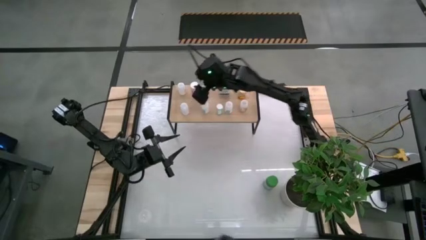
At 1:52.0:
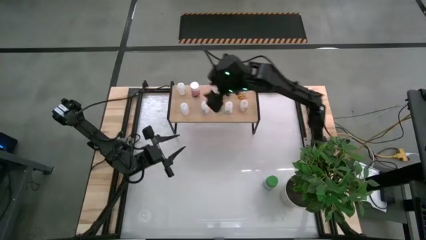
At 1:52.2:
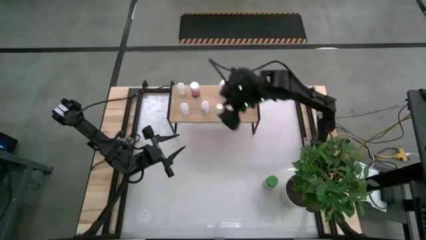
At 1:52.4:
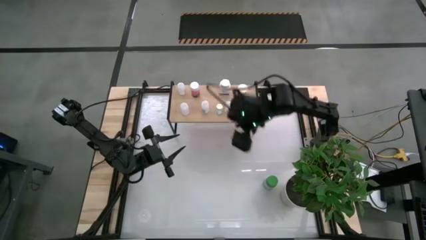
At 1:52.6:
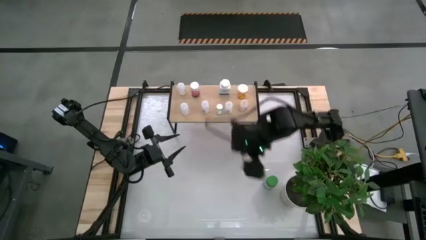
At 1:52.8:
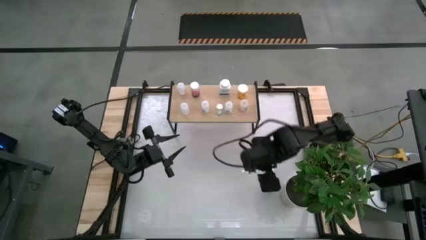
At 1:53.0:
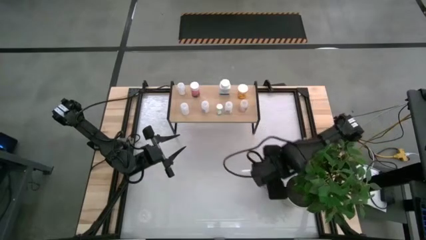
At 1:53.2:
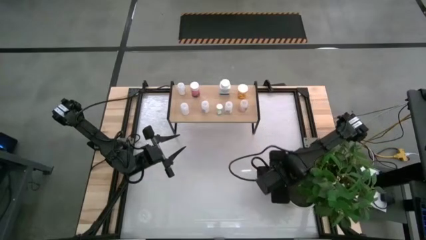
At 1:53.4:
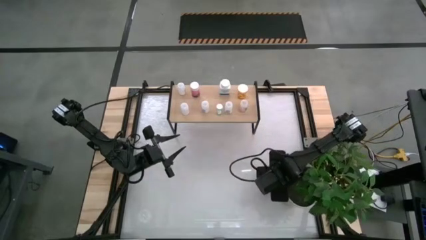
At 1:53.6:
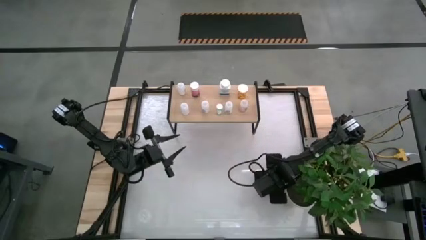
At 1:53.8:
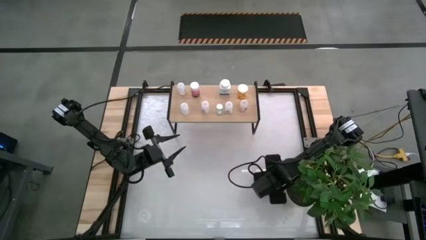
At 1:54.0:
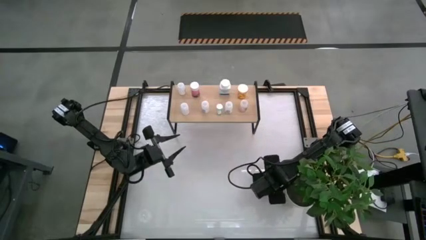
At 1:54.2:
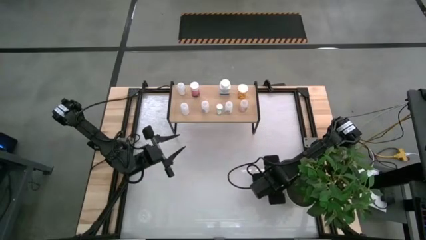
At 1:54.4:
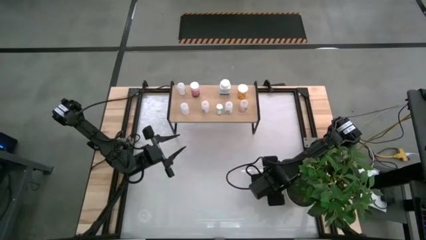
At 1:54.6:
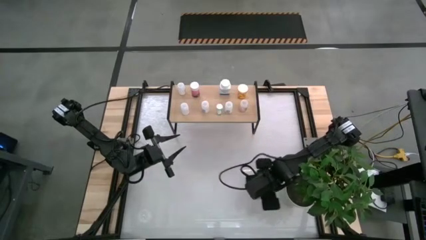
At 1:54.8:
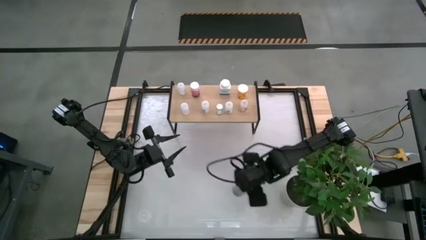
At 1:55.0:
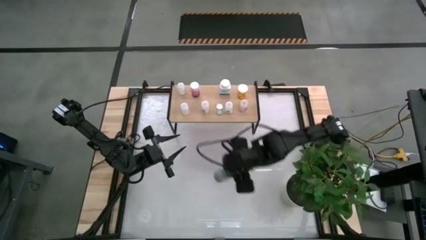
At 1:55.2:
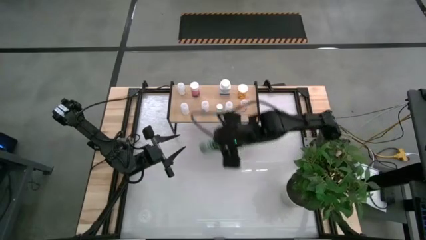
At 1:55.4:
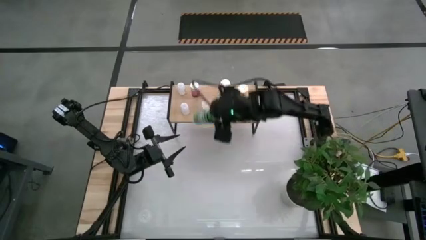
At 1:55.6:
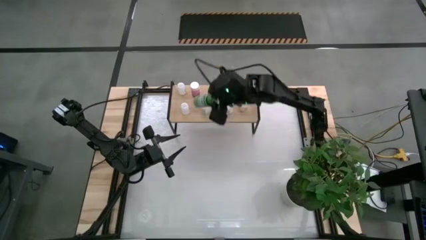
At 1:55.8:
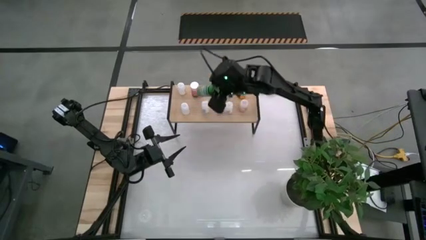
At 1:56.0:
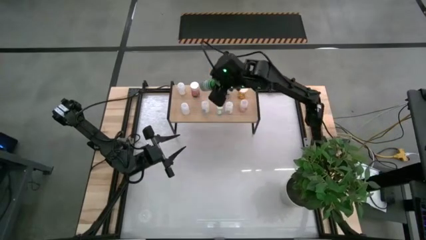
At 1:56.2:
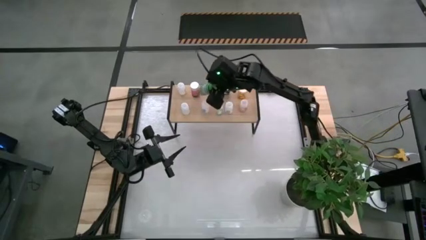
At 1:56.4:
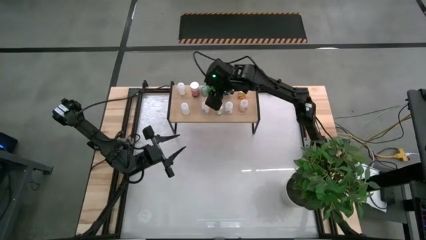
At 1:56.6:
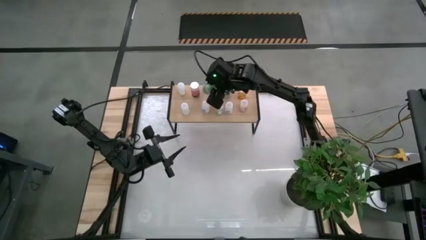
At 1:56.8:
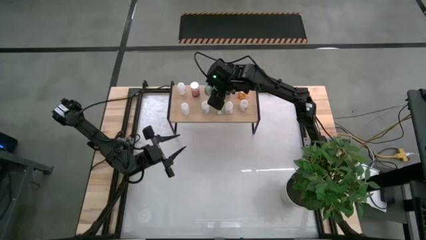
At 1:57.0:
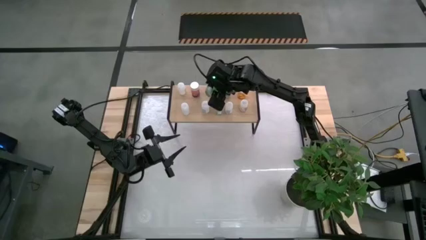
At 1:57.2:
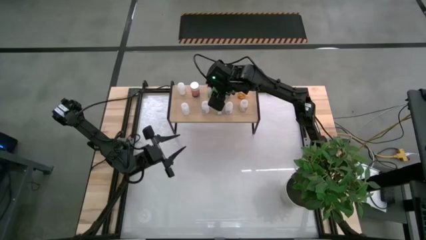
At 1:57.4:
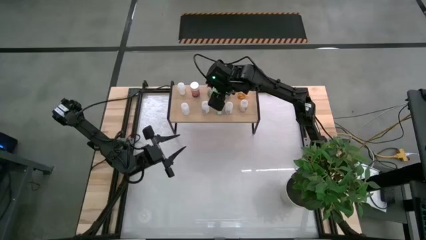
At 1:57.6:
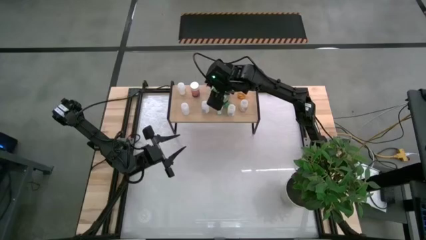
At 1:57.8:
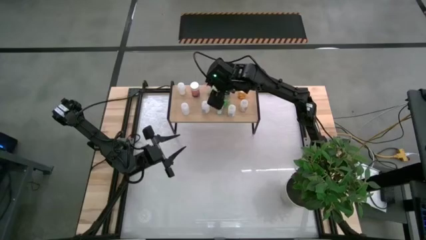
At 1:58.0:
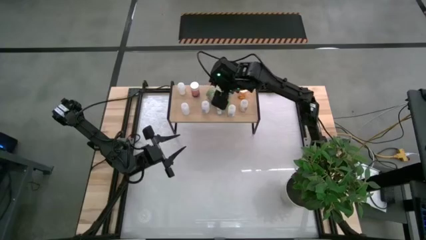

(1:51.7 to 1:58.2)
Task: Pick and place medicine bottles onto shelf by color
Put the green pill bottle on the shelf

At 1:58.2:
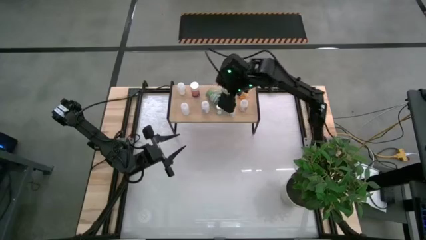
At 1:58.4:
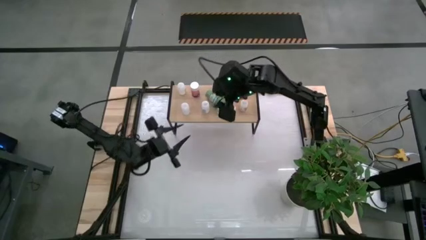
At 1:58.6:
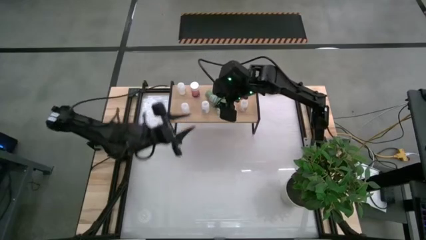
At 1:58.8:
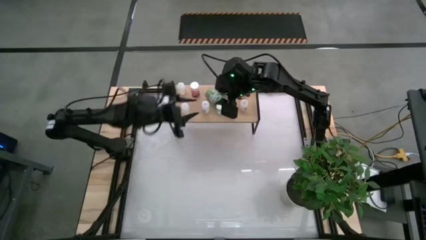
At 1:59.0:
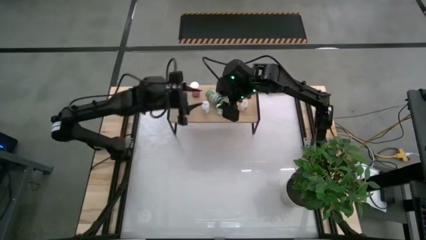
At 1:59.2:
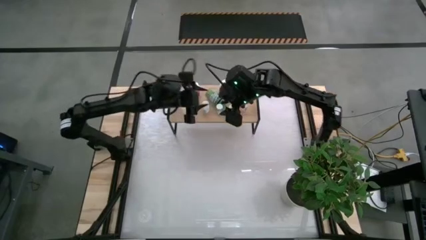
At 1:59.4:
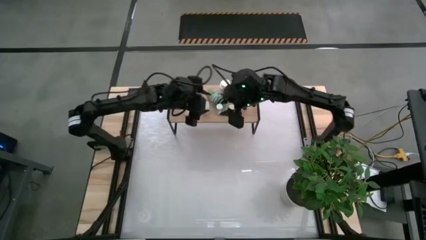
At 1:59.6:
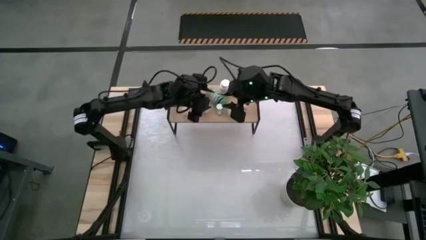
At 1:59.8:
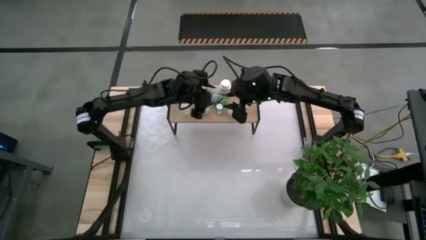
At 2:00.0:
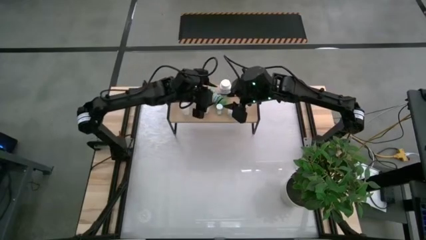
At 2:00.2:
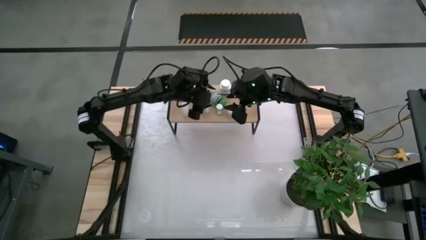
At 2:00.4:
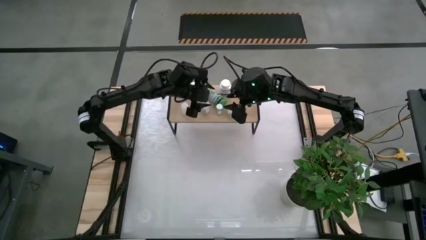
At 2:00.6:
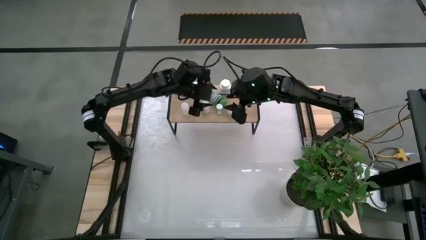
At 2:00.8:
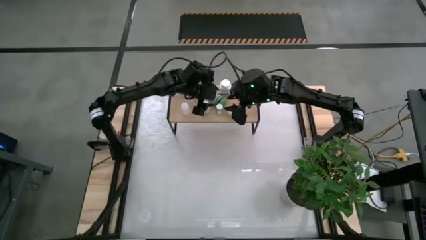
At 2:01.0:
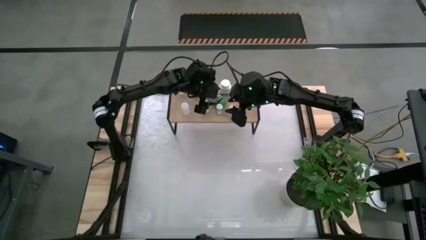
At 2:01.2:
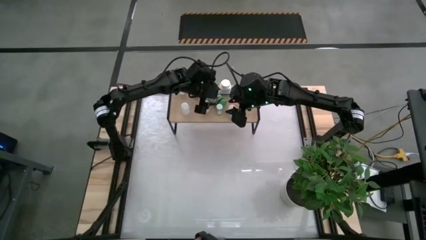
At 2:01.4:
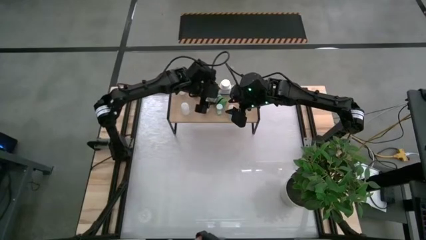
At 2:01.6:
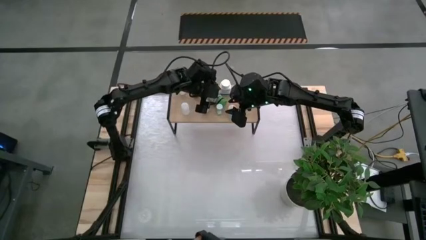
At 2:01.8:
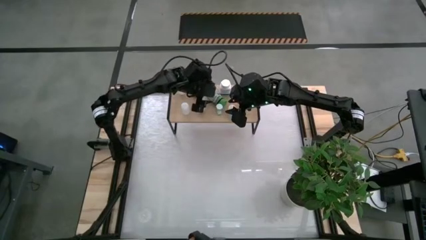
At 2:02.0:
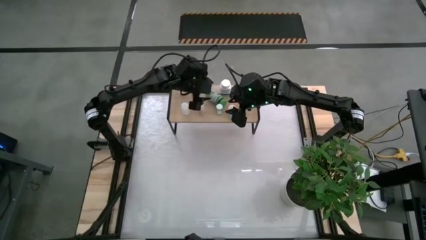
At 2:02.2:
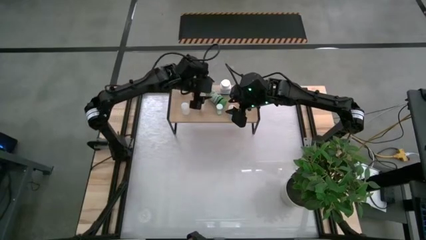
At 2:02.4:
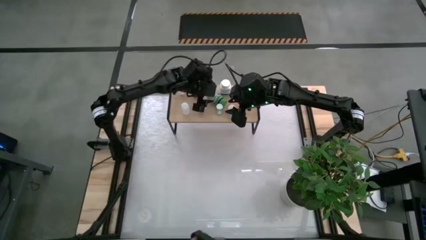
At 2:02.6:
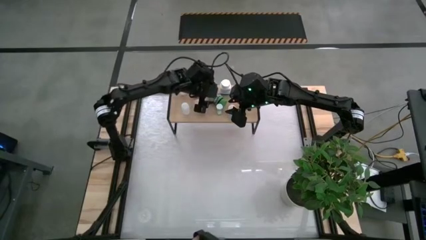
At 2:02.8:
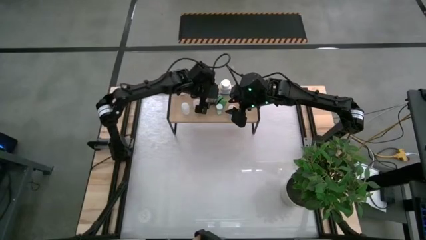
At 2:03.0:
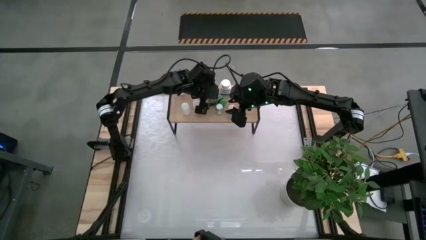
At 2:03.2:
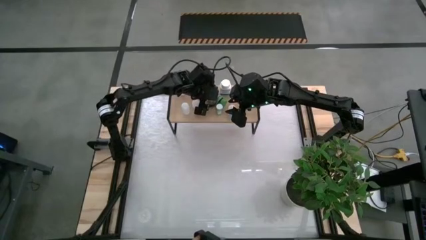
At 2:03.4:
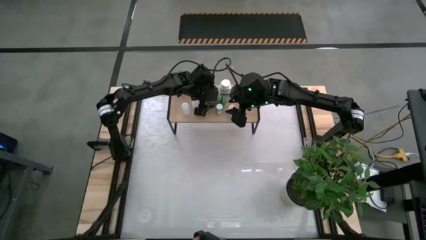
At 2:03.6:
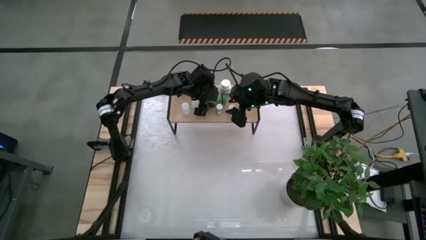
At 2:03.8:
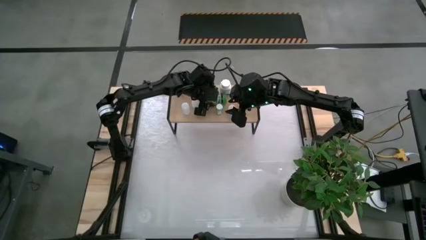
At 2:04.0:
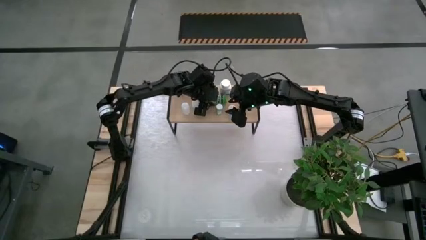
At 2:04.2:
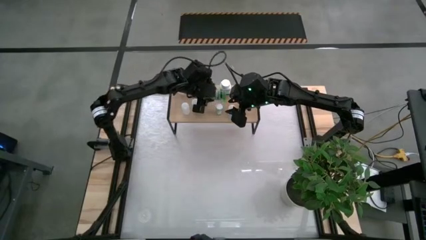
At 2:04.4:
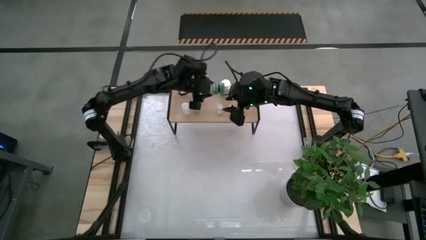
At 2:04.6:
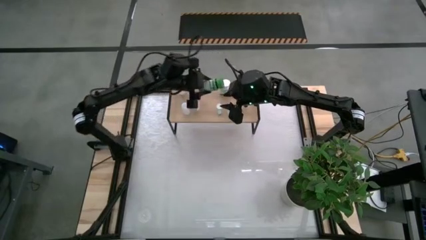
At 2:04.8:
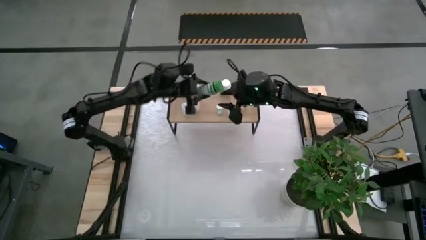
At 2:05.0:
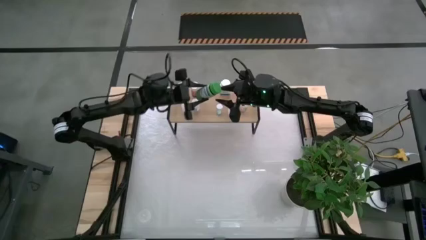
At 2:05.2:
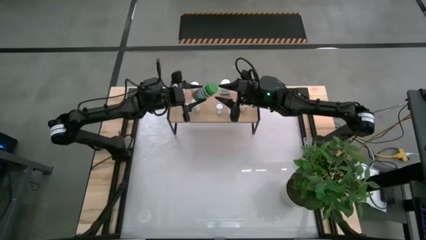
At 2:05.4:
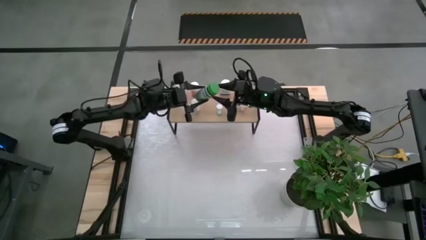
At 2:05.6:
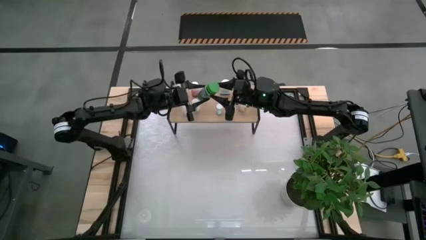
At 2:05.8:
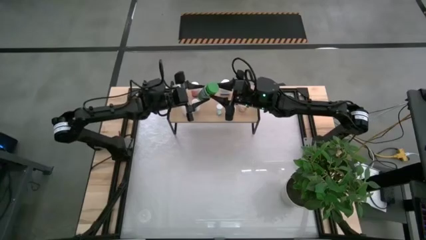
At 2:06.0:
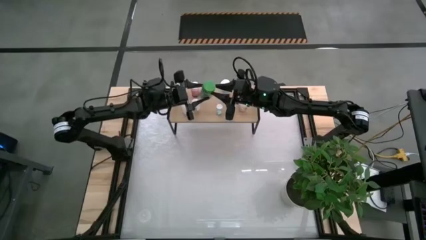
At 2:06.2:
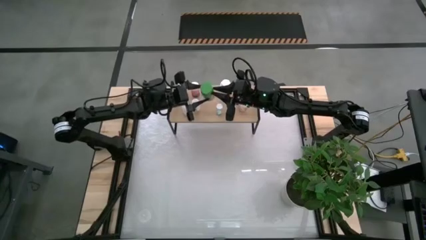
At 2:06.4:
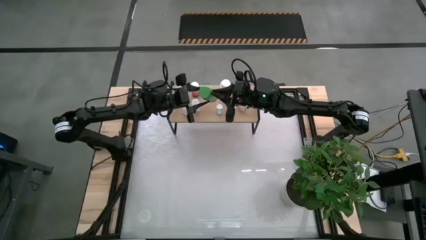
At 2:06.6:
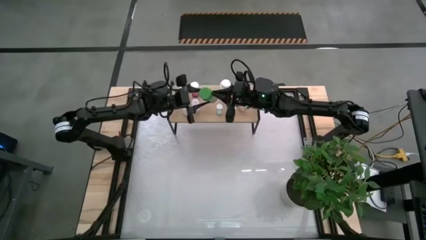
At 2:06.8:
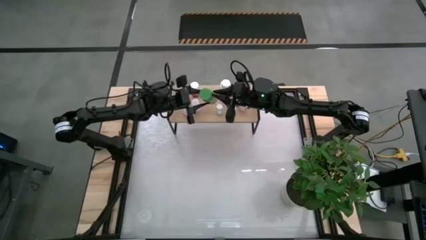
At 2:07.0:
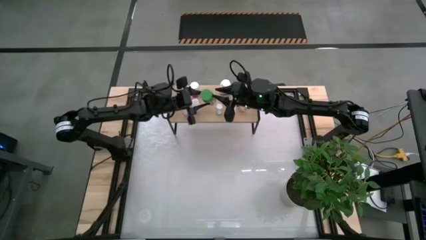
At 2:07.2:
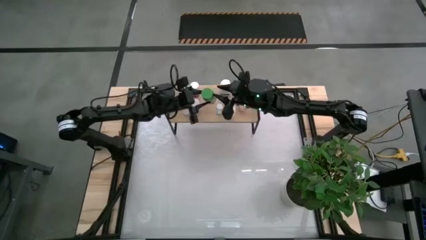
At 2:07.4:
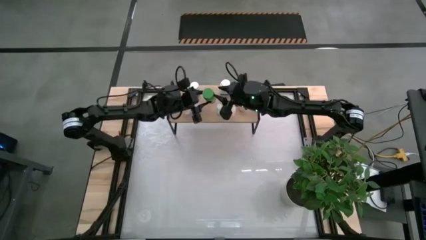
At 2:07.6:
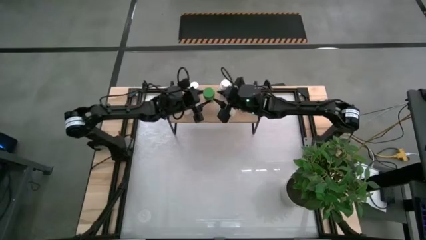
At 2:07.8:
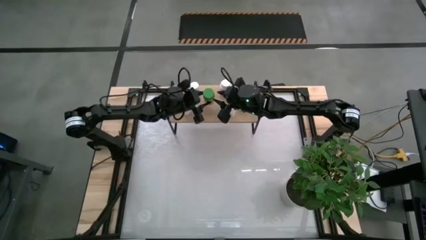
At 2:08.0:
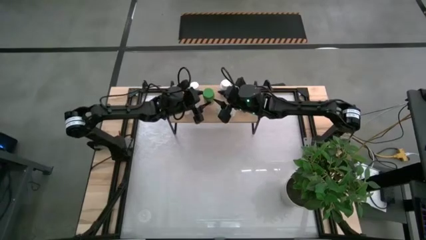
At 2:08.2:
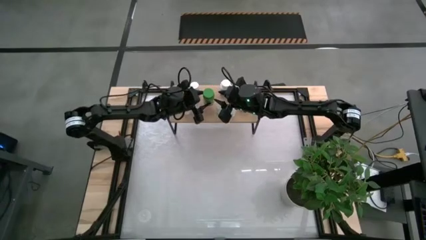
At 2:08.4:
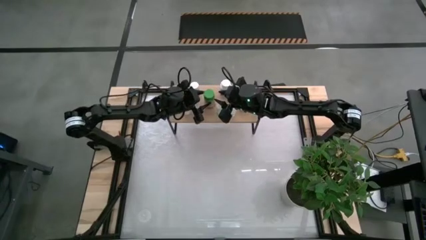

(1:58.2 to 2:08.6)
Put the green pill bottle on the shelf
